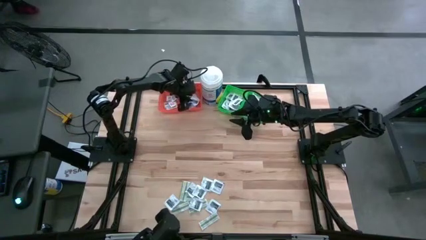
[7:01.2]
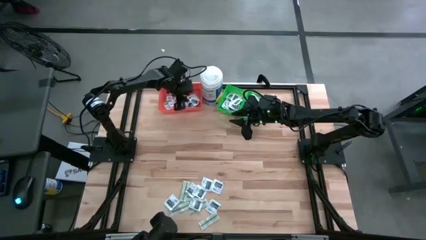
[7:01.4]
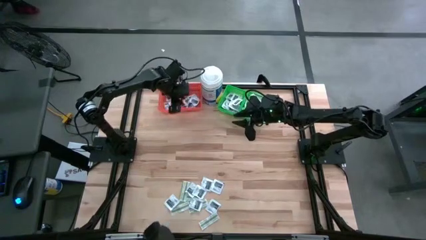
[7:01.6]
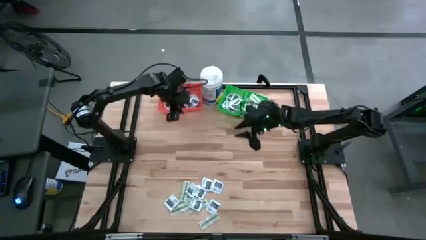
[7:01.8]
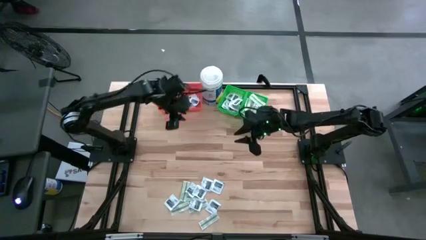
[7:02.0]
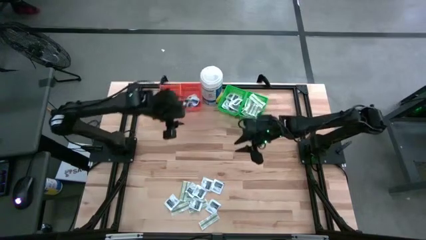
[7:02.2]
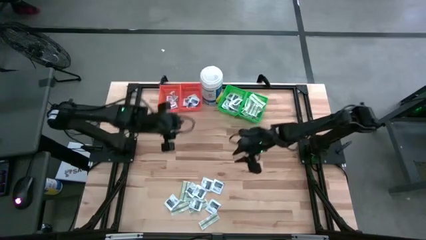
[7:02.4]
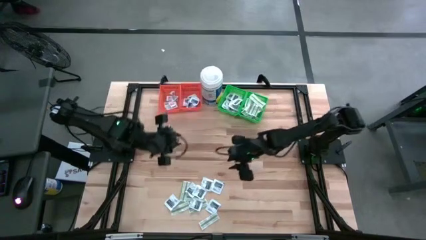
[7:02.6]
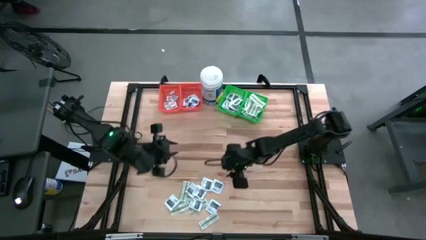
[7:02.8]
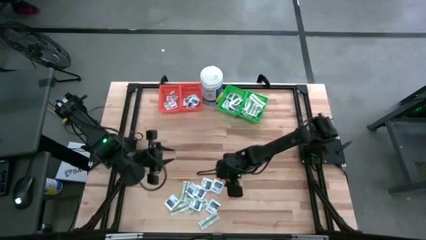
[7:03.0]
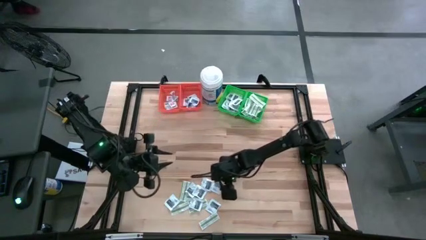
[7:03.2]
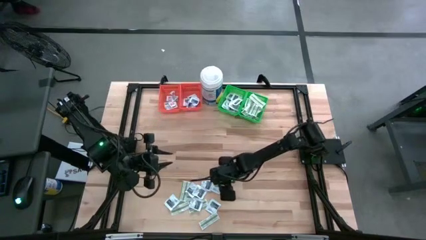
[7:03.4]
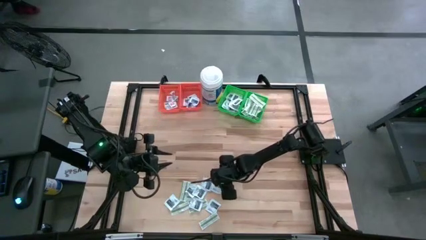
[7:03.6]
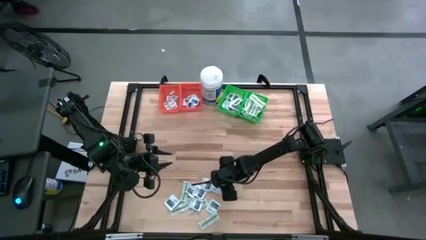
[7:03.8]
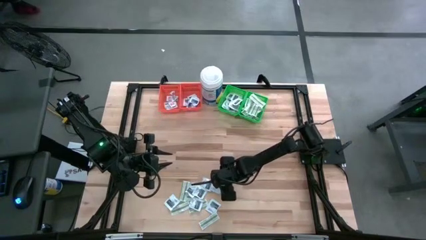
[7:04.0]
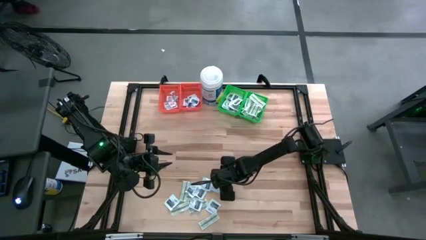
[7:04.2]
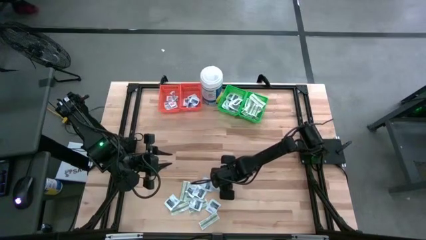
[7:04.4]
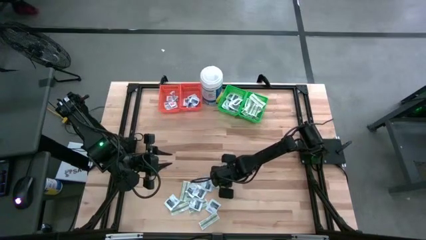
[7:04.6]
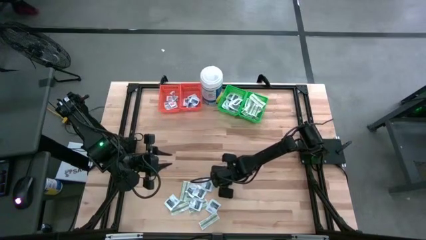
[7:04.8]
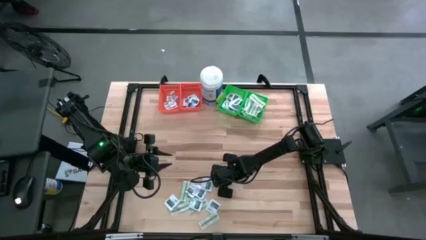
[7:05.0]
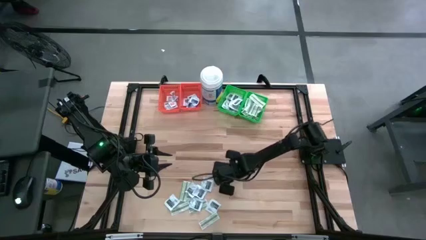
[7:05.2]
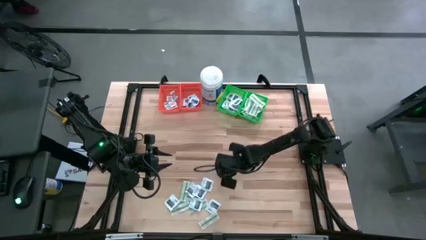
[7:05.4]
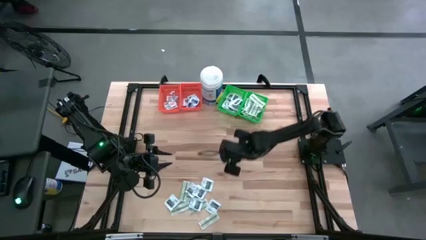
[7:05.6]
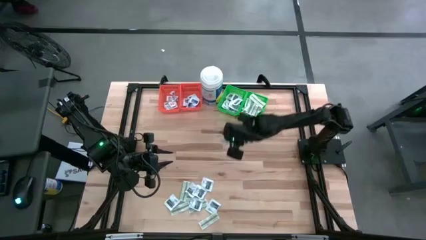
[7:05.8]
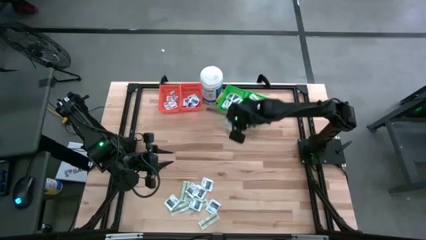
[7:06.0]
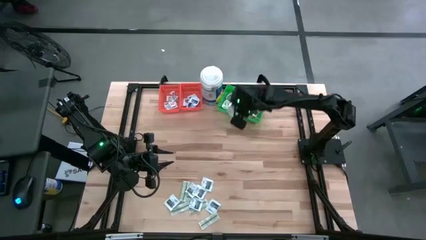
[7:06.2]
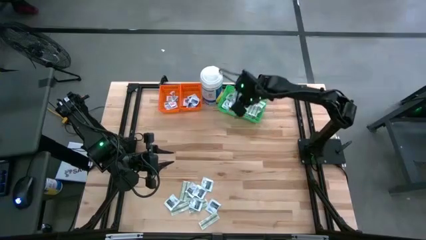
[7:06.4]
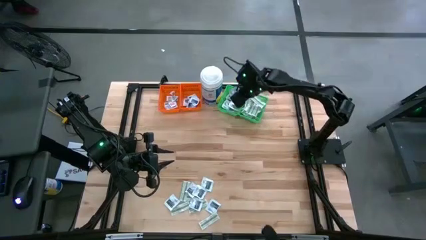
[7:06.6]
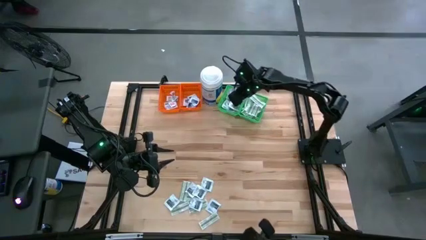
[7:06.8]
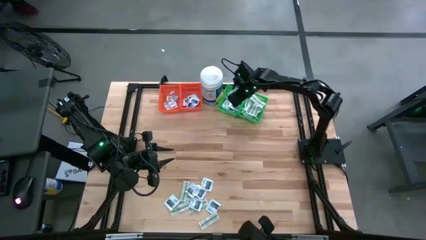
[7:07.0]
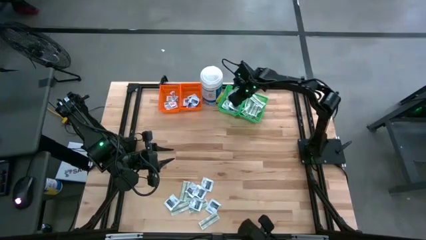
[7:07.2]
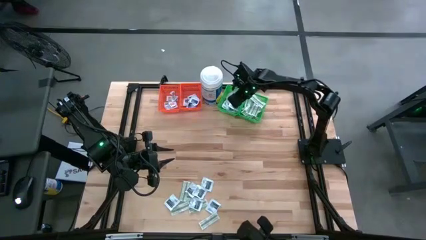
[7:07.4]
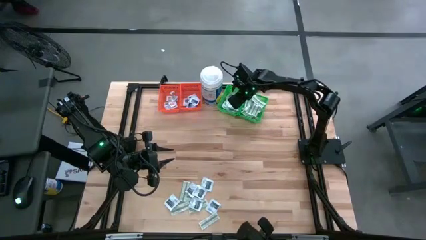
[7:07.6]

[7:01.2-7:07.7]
Task: Pick & Place First Aid Supplies
Put the black towelette pack into the left green bin

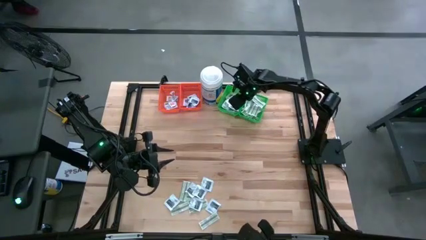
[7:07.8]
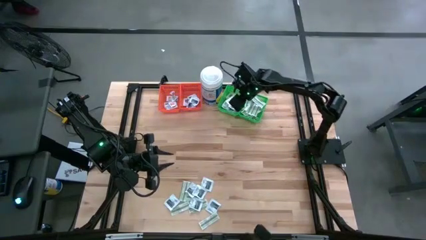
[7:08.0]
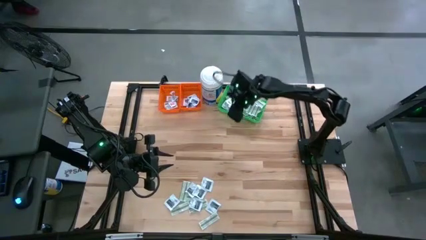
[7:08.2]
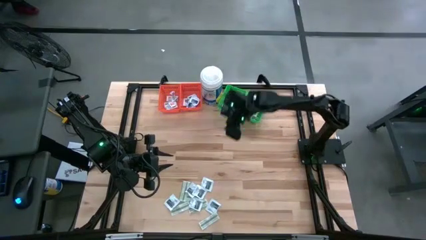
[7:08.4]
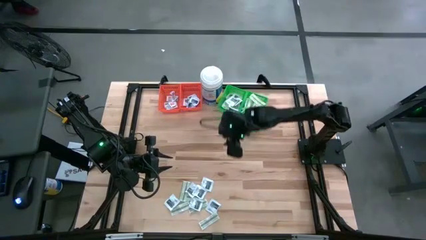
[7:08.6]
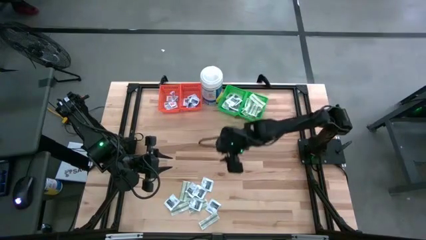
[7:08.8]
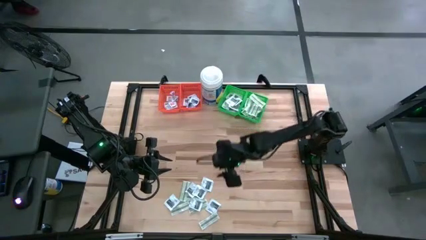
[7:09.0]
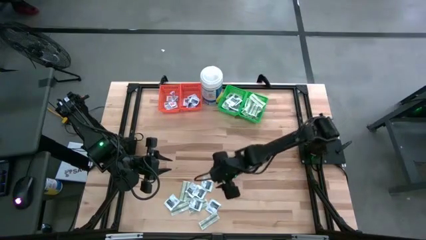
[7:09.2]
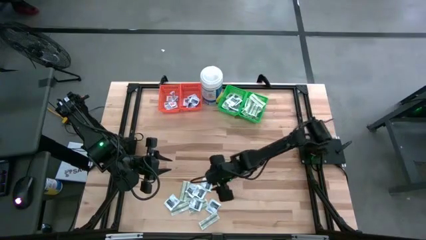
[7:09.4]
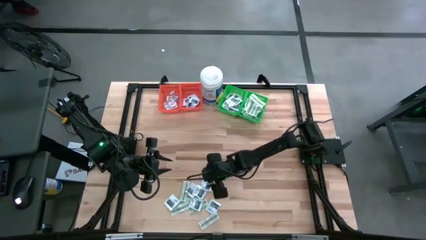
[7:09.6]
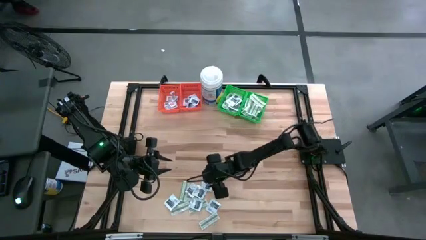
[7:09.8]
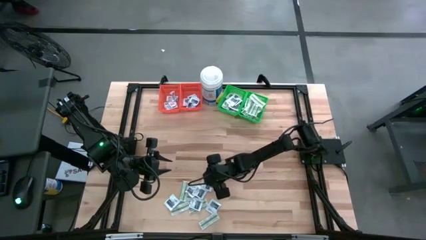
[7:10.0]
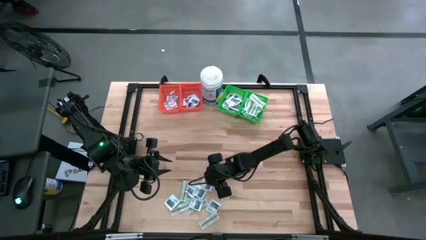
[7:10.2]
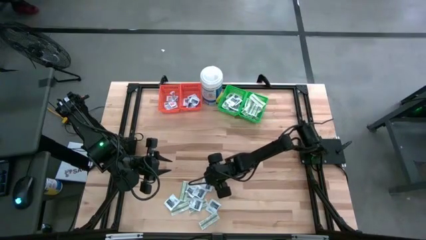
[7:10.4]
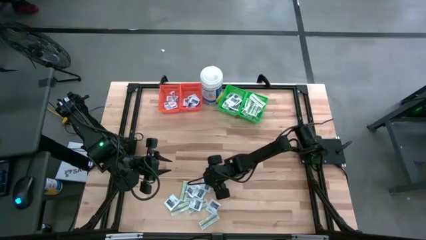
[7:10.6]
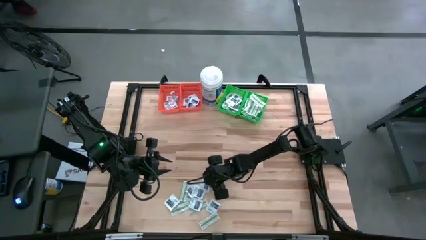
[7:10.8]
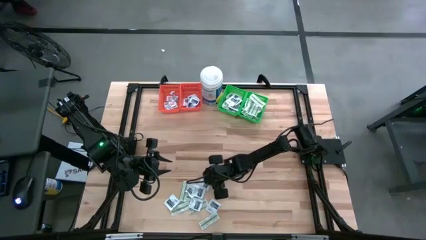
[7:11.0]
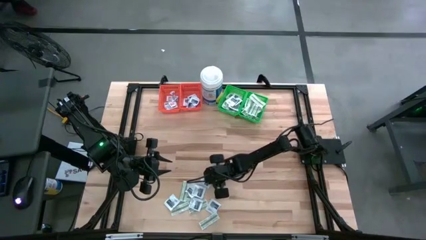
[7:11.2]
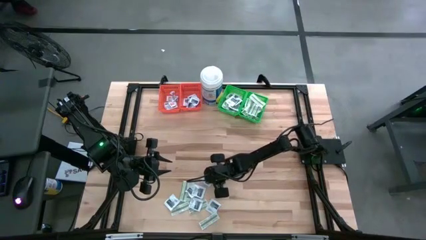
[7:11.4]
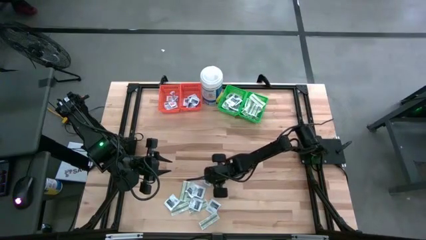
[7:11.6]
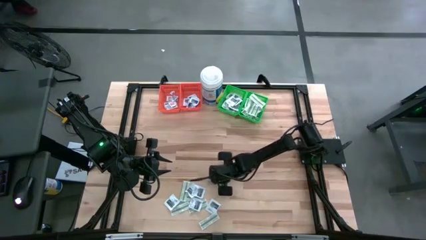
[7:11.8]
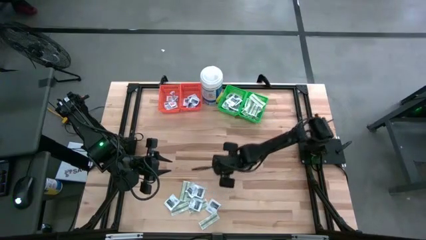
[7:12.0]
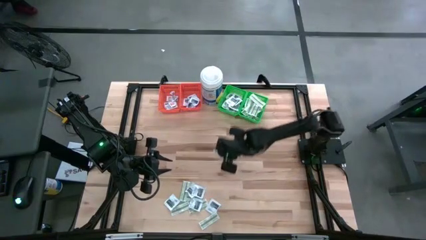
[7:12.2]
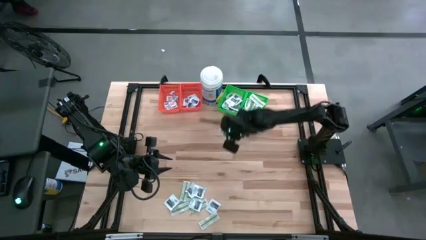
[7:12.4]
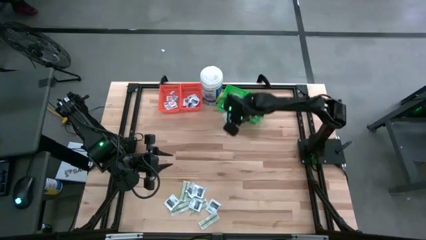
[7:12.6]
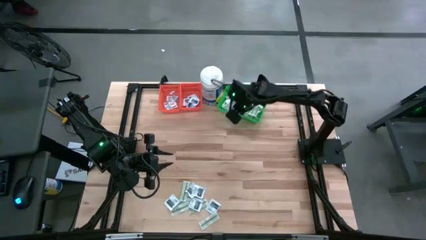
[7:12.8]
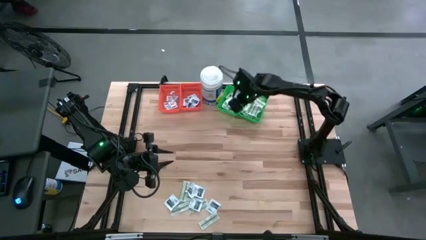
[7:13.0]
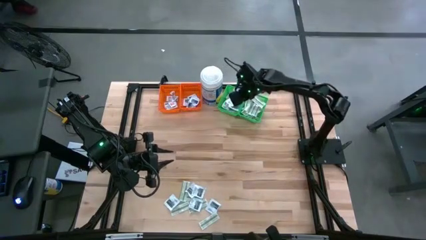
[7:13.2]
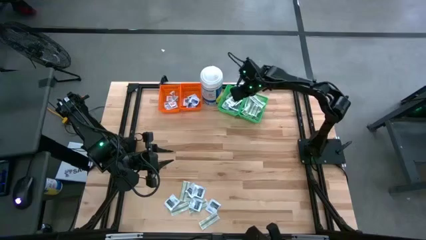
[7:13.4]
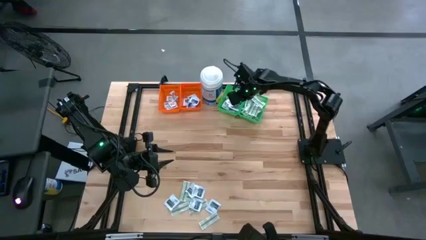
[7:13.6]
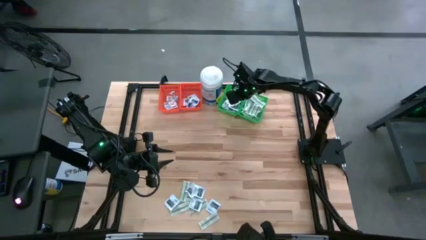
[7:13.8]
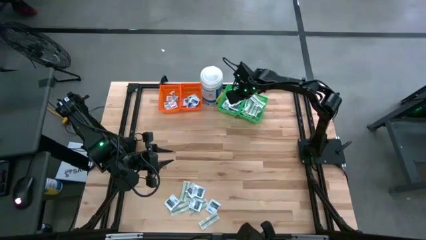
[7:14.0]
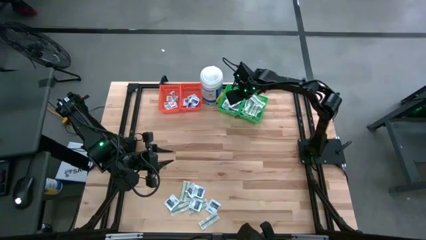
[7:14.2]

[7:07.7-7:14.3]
Put the black towelette pack into the left green bin
